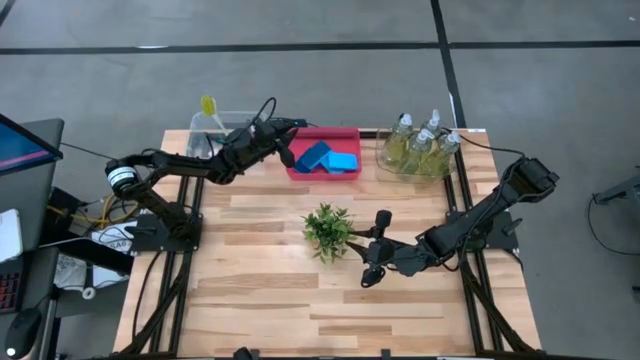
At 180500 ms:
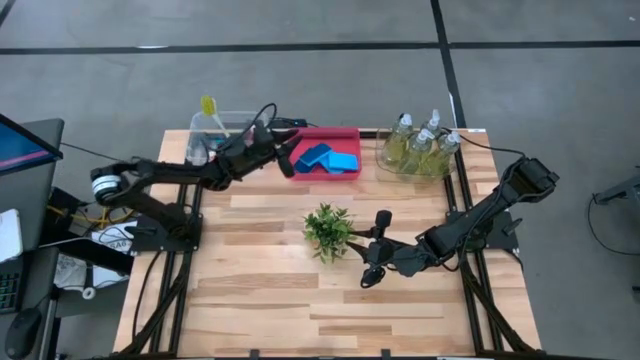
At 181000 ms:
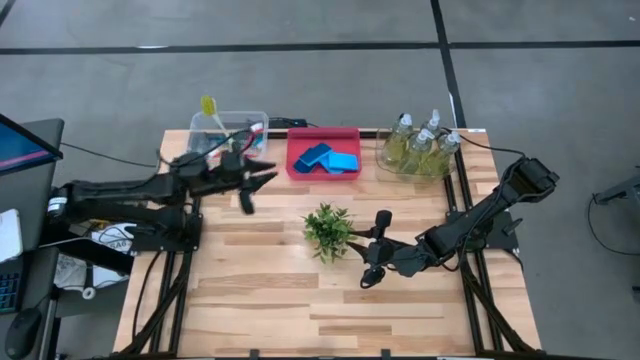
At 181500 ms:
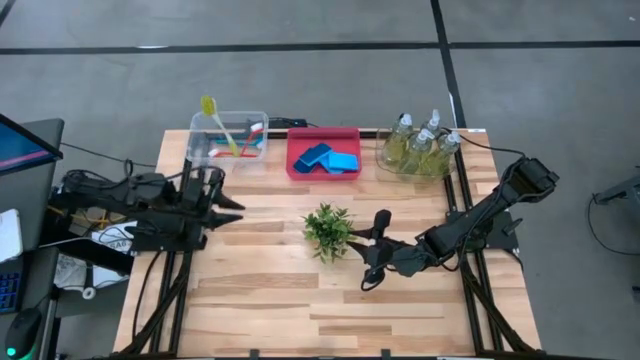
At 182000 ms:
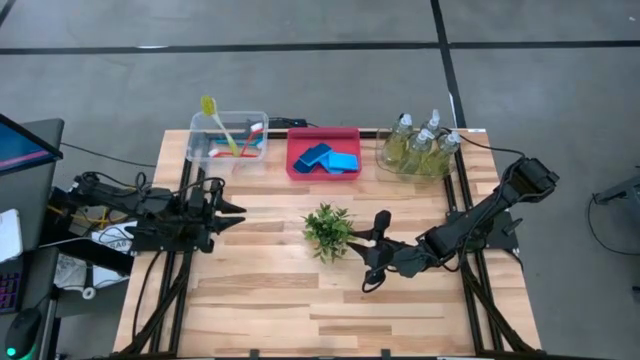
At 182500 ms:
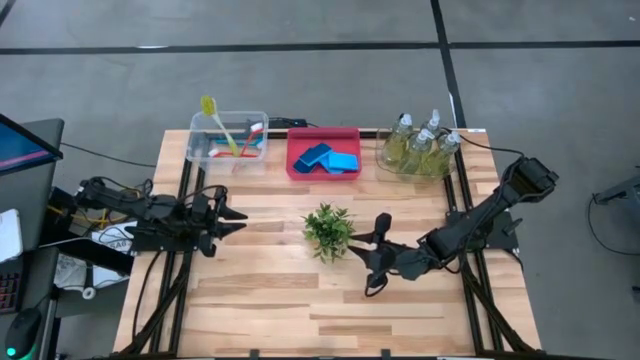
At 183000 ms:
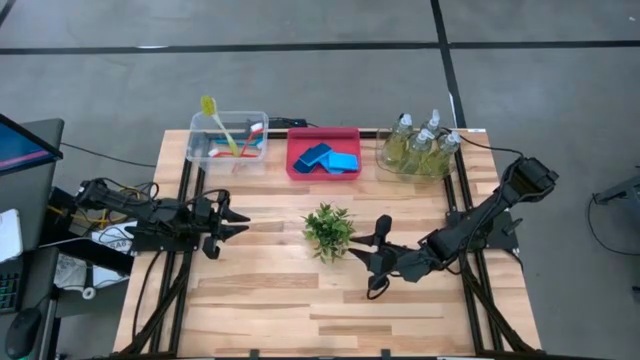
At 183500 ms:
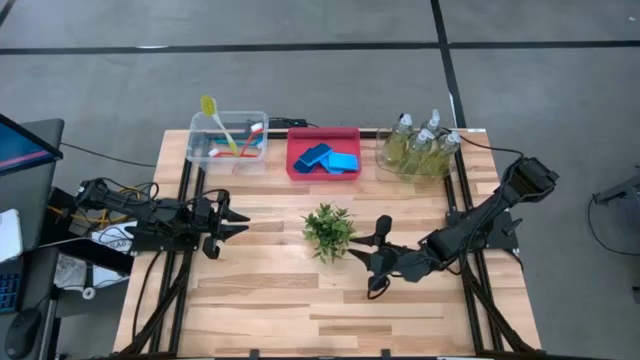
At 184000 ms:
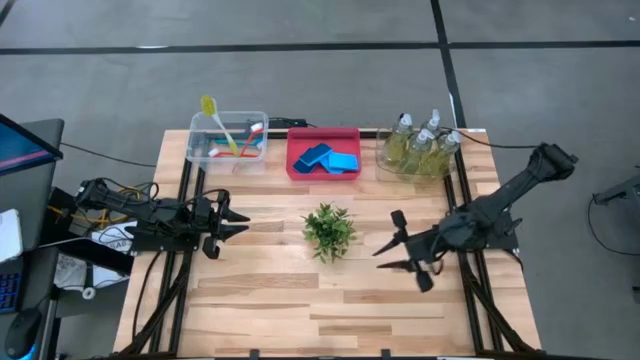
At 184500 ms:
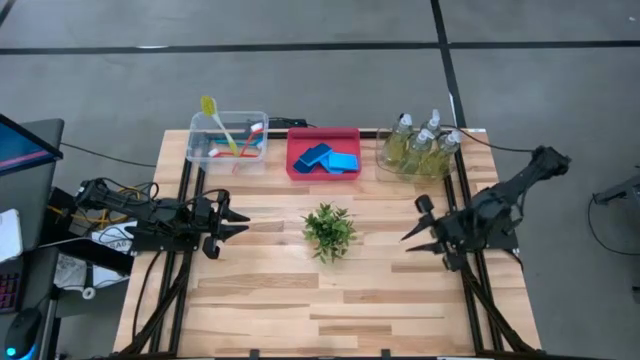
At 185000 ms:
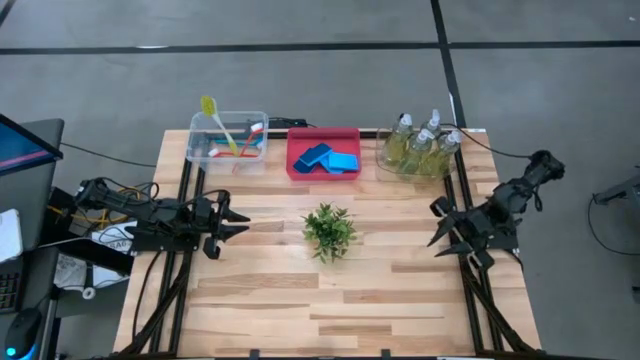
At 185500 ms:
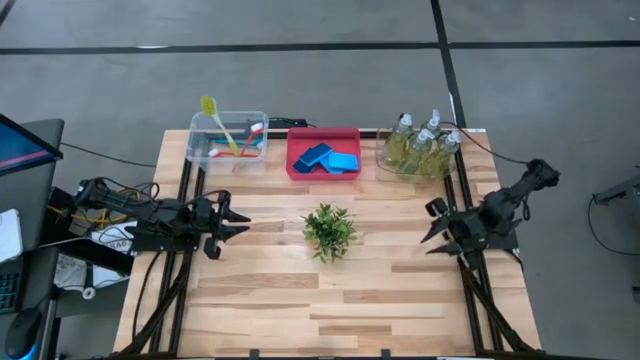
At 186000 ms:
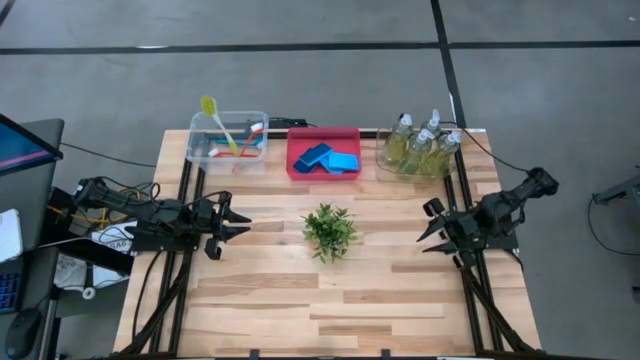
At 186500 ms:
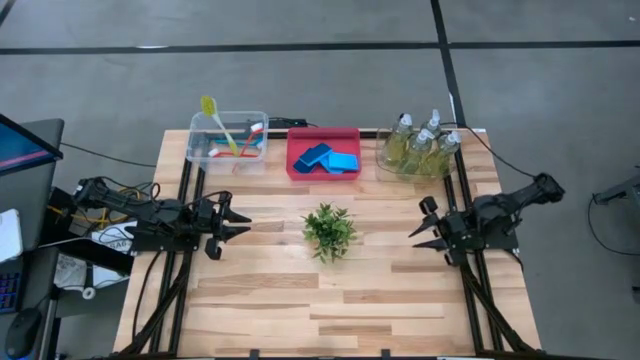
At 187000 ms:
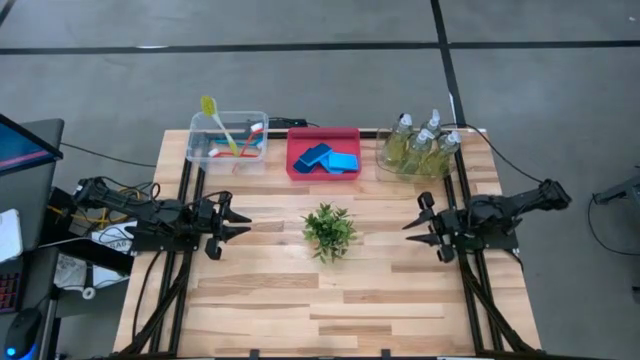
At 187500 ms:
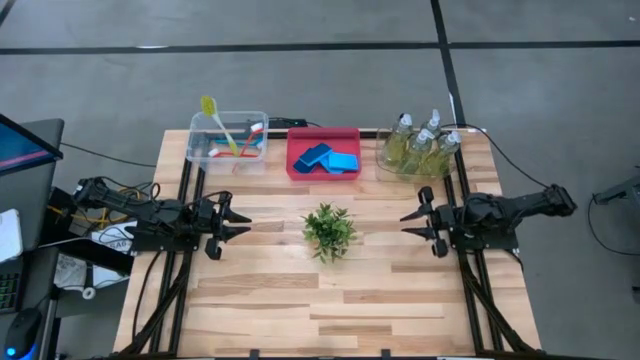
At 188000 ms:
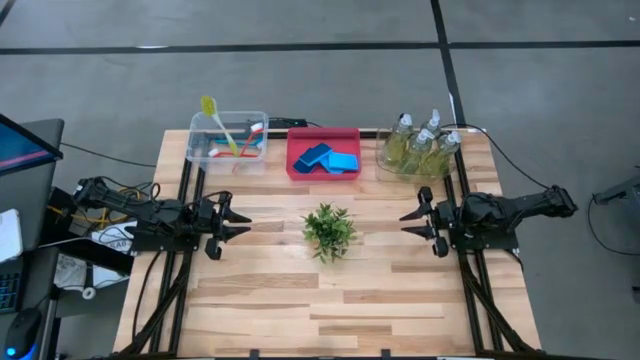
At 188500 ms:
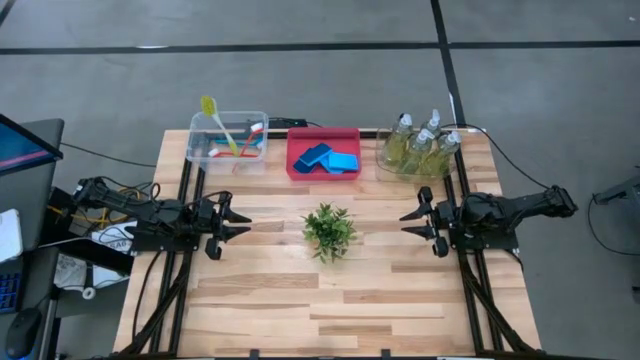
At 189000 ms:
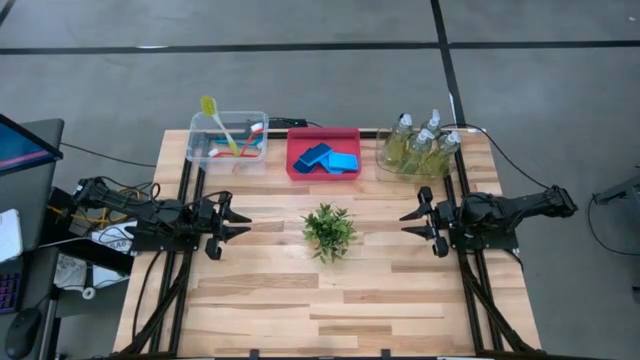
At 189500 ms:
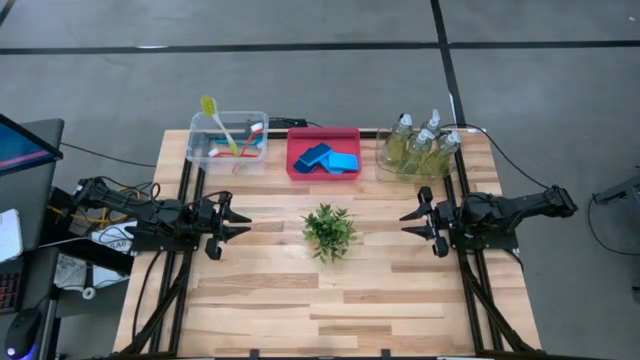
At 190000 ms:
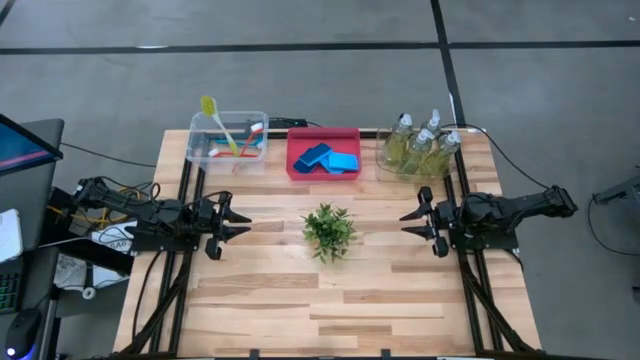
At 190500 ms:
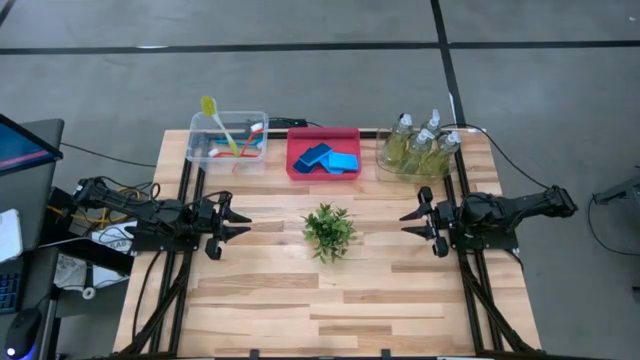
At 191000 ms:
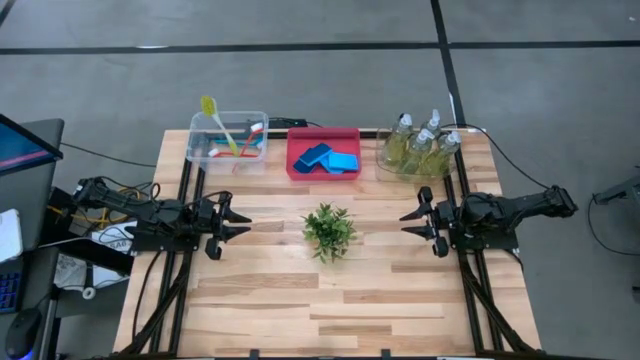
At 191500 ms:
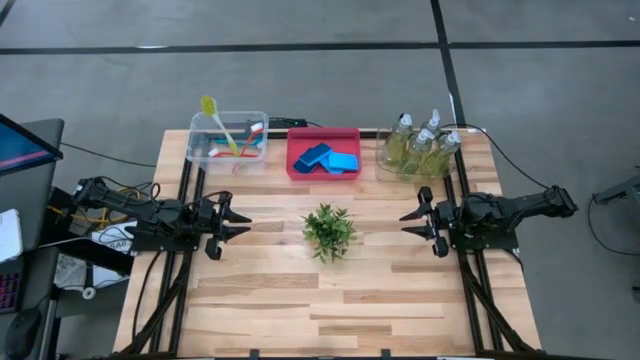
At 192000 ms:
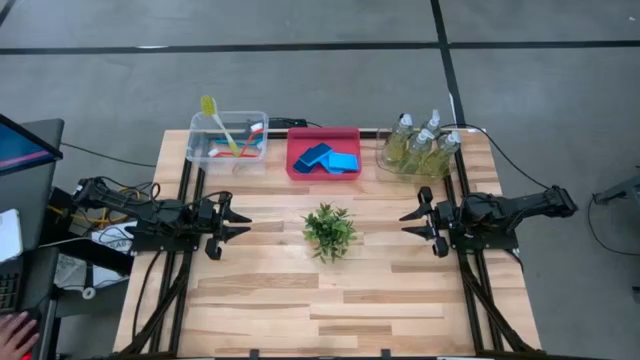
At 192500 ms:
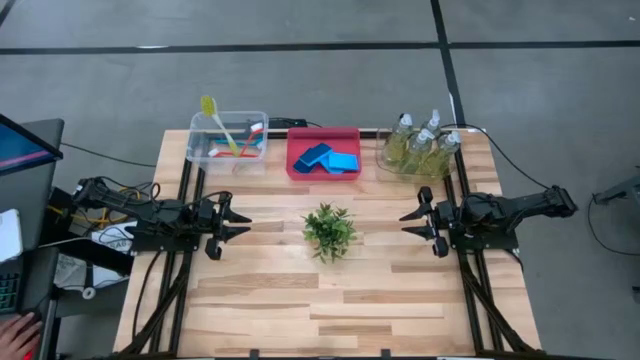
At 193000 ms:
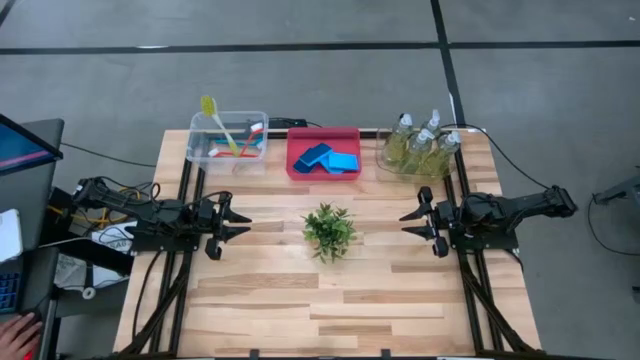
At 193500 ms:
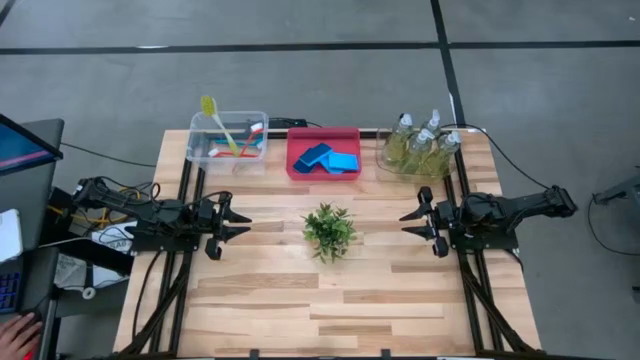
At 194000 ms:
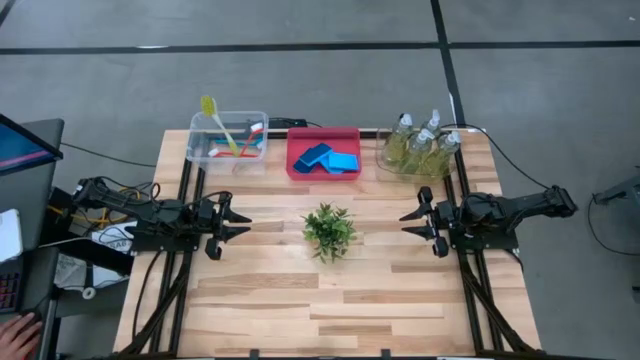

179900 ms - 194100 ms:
Task: Pick & Place Kitchen Sink Supplies
Return to Home Position

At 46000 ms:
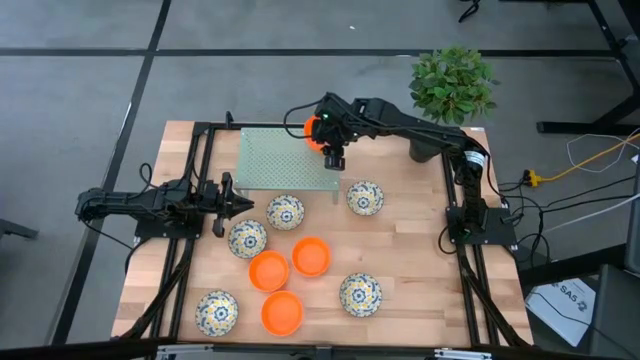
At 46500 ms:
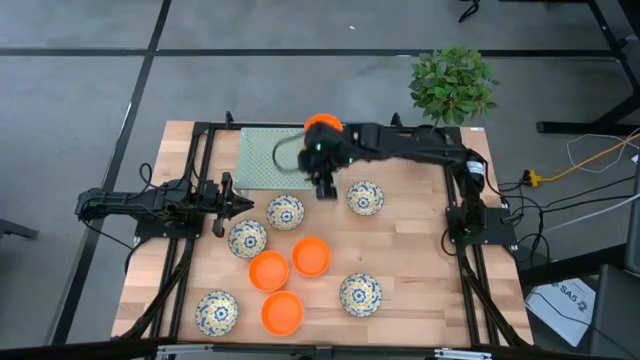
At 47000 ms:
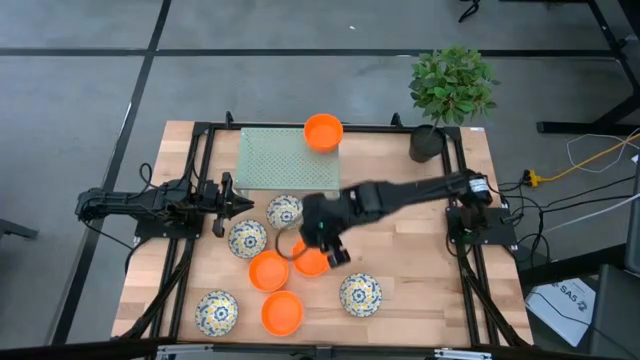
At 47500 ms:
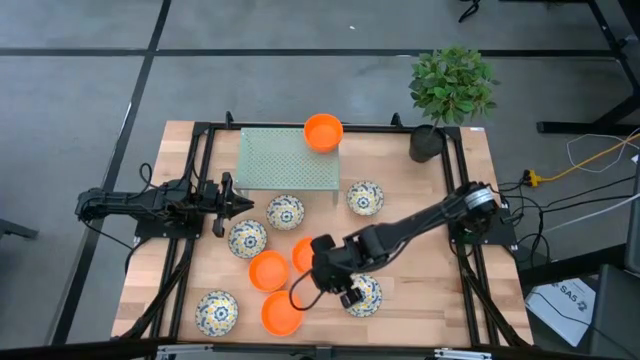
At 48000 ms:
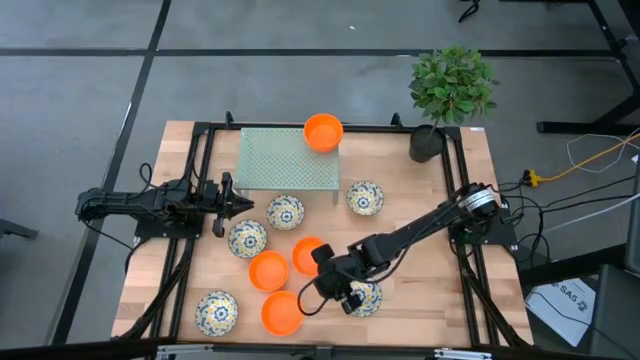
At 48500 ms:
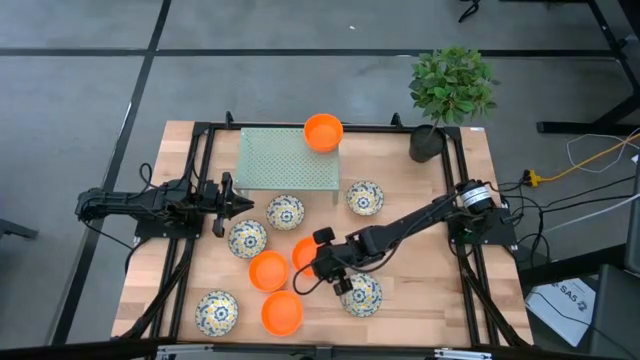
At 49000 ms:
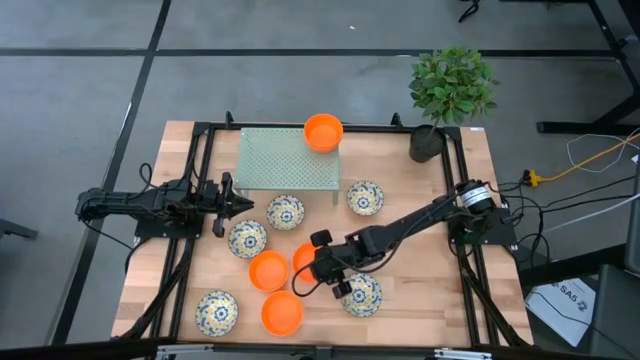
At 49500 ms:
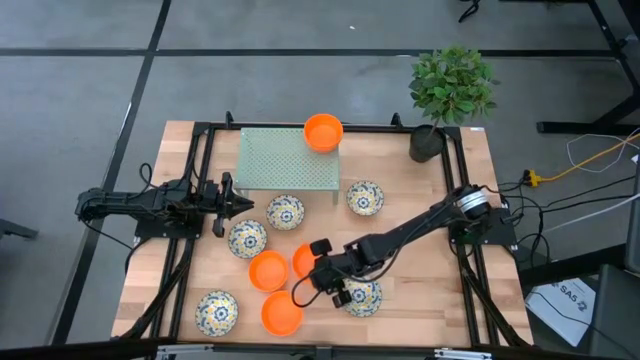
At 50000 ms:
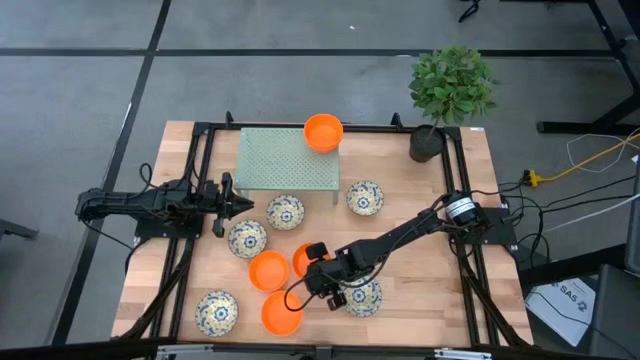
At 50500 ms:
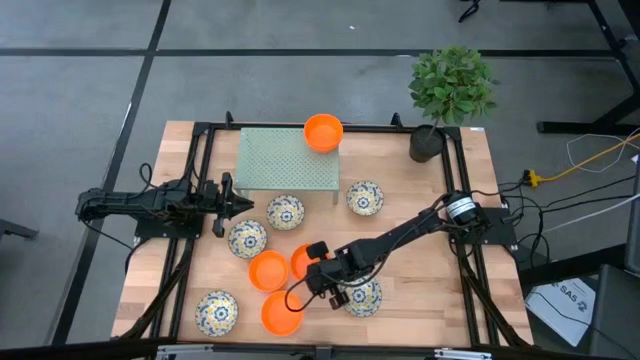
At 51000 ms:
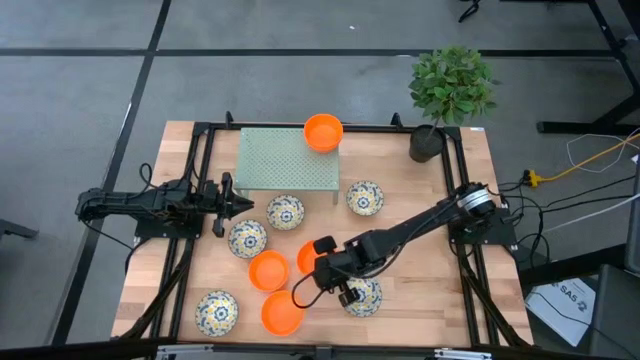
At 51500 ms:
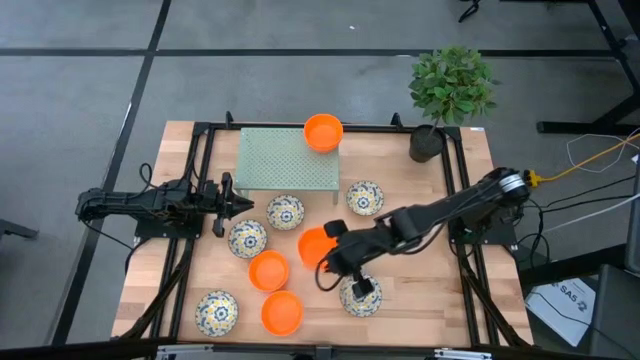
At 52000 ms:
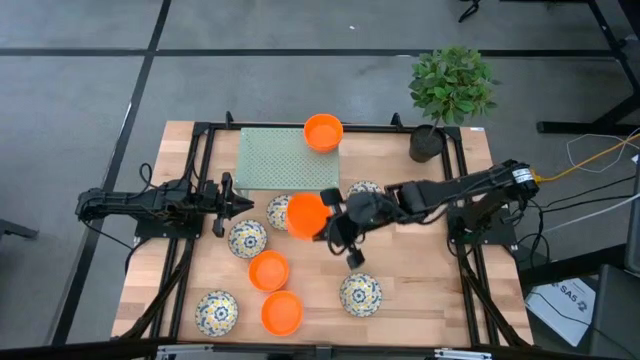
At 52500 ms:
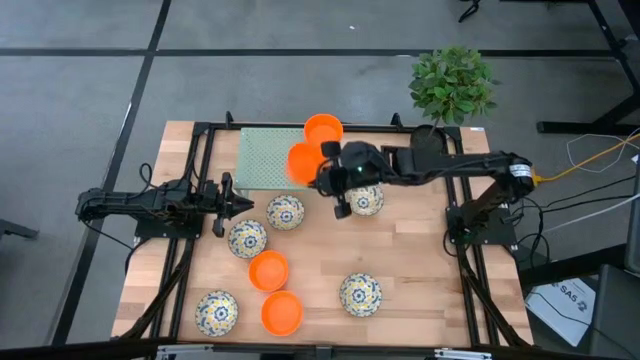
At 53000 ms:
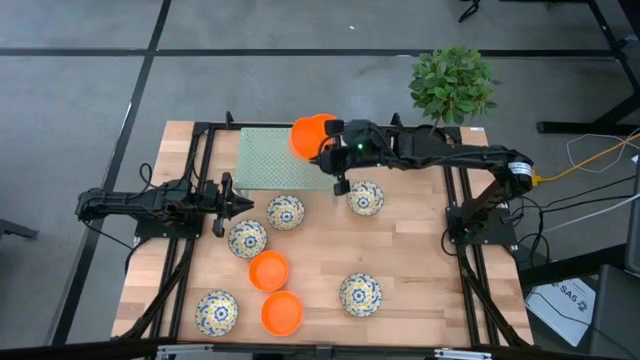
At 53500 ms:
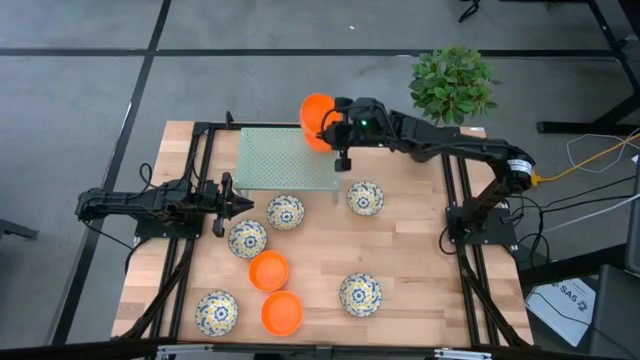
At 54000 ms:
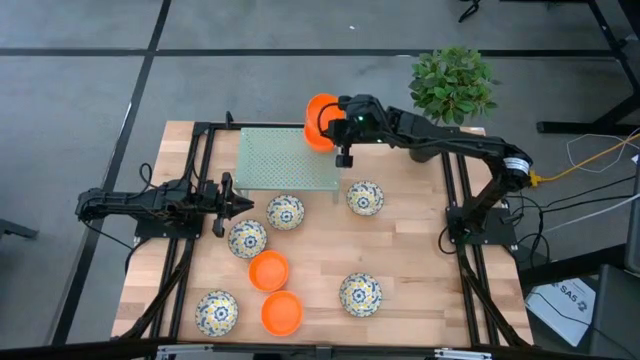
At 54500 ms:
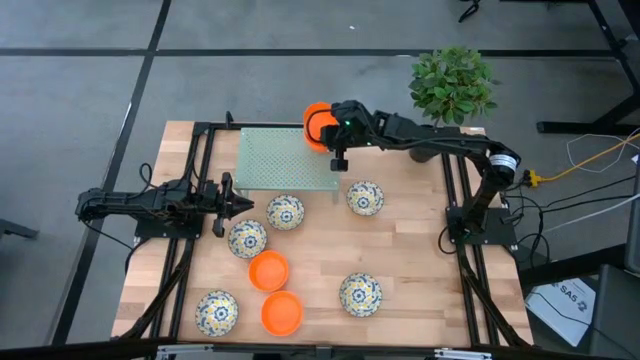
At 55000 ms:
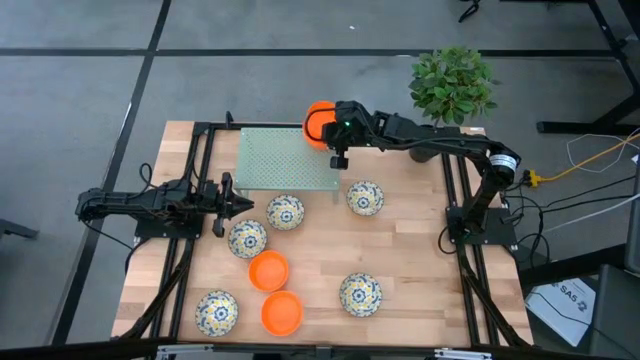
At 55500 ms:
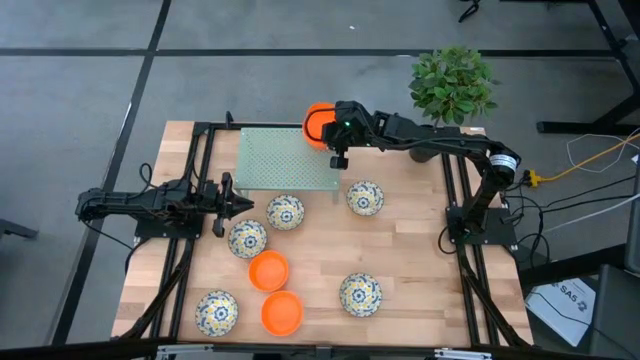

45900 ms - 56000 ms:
Task: Pick & Place Mini bowls
Stack the orange bowl on top of the other orange bowls on the shelf
